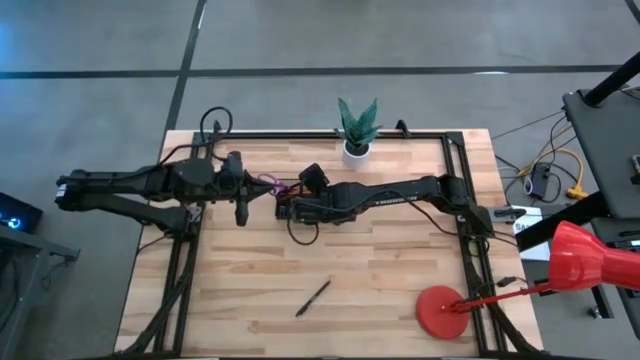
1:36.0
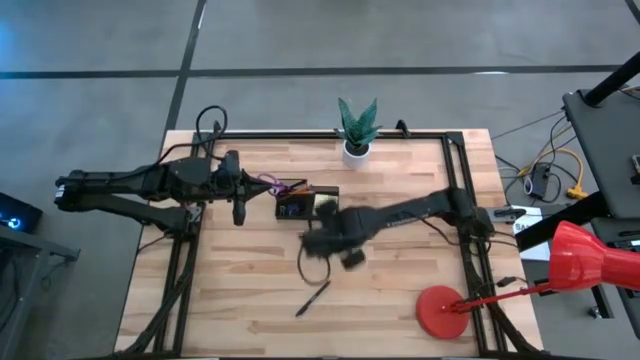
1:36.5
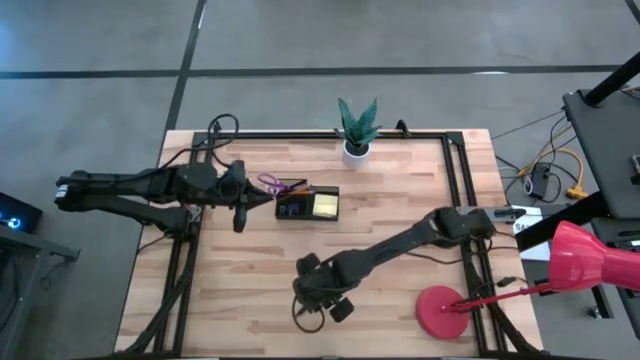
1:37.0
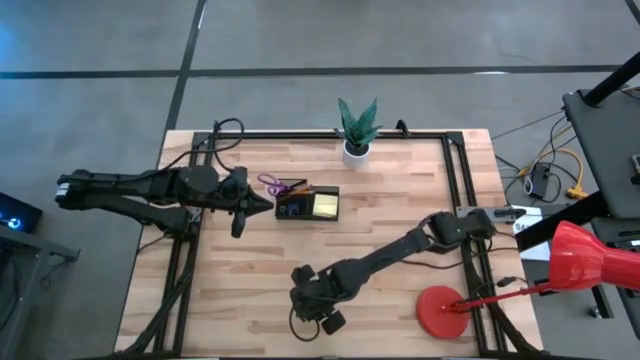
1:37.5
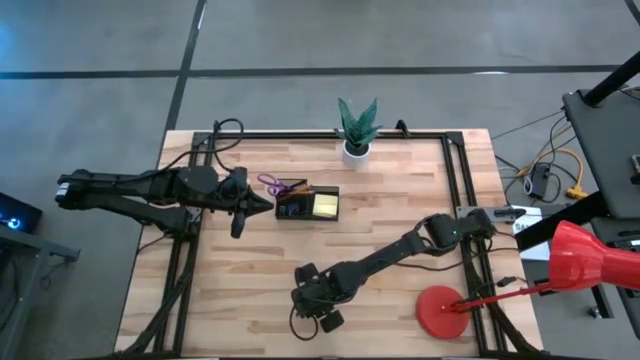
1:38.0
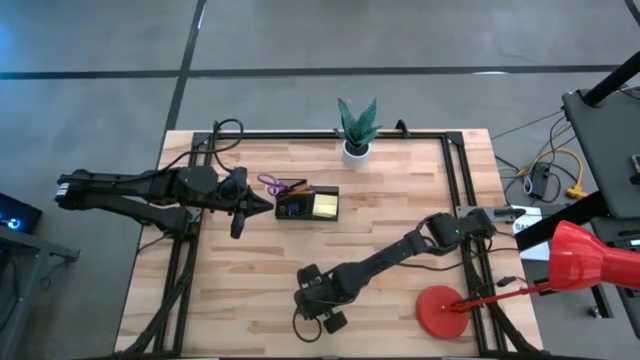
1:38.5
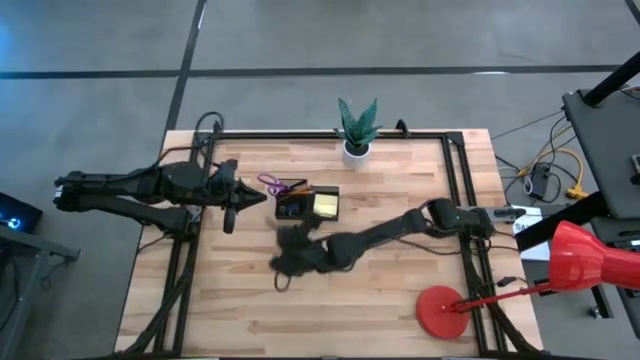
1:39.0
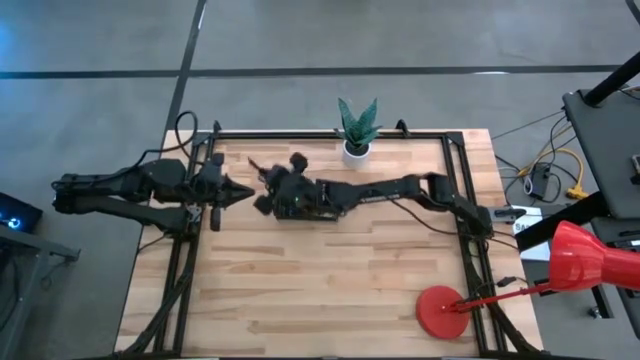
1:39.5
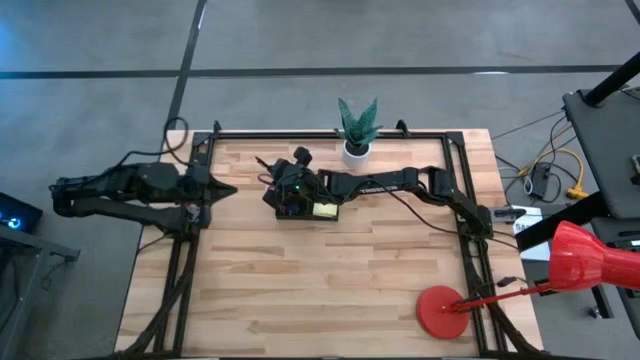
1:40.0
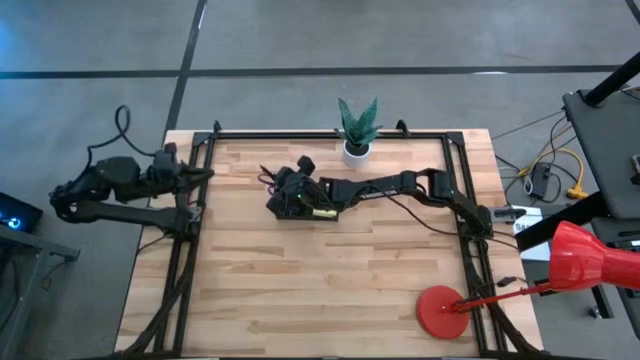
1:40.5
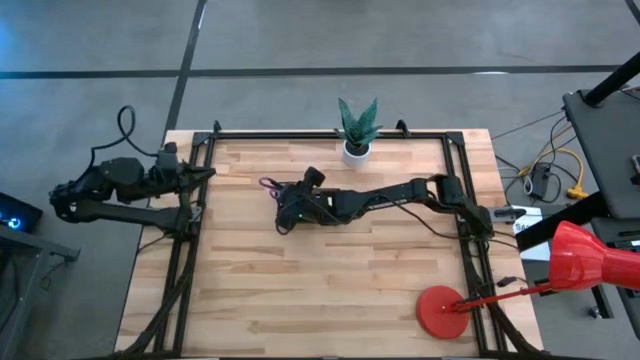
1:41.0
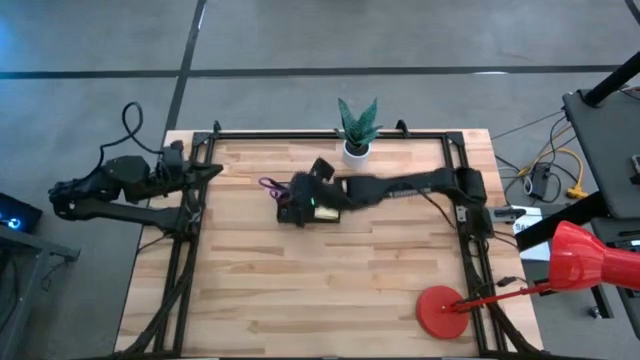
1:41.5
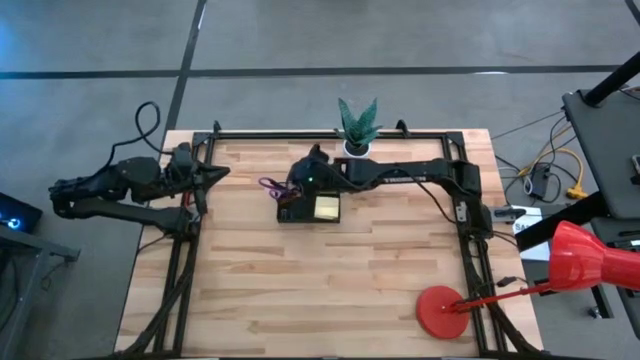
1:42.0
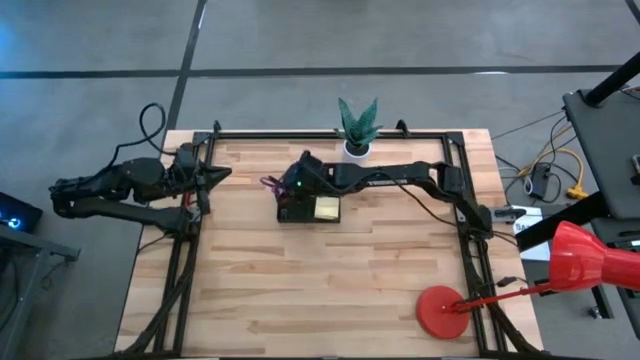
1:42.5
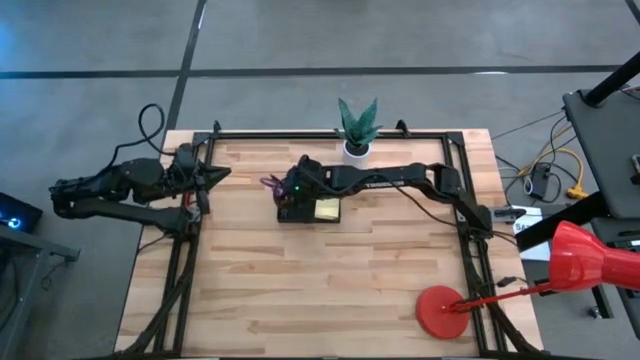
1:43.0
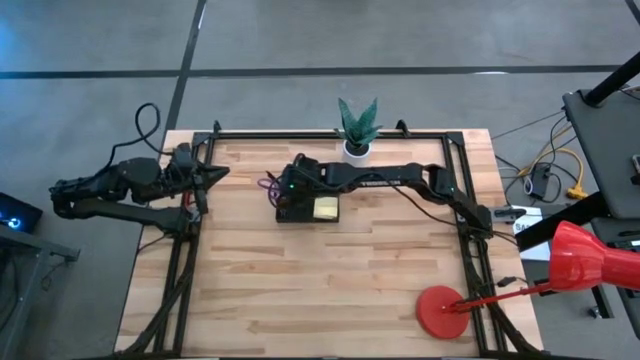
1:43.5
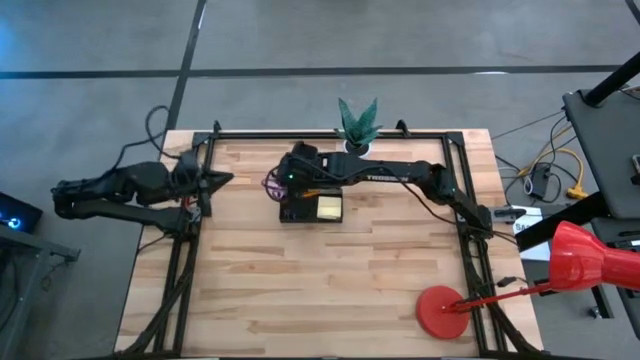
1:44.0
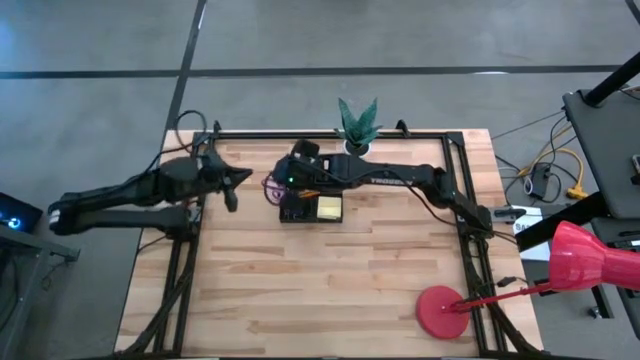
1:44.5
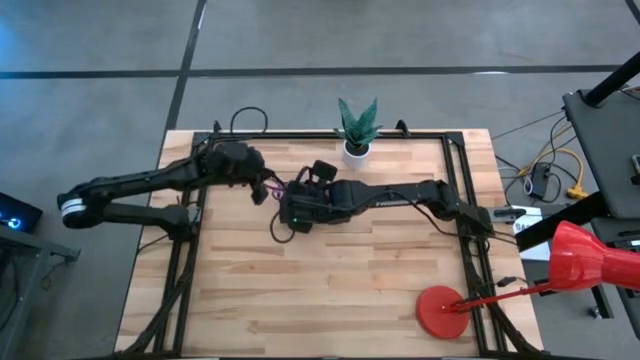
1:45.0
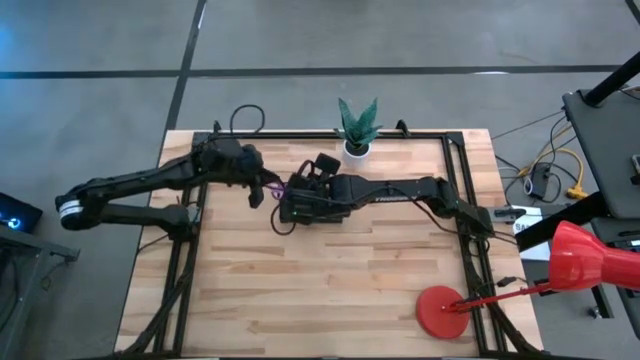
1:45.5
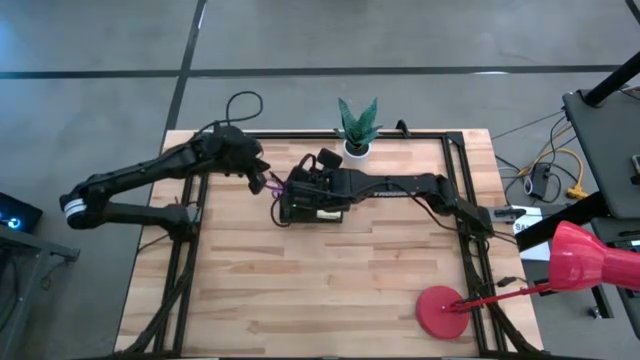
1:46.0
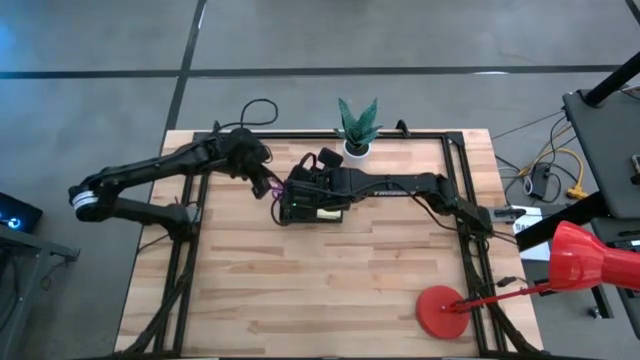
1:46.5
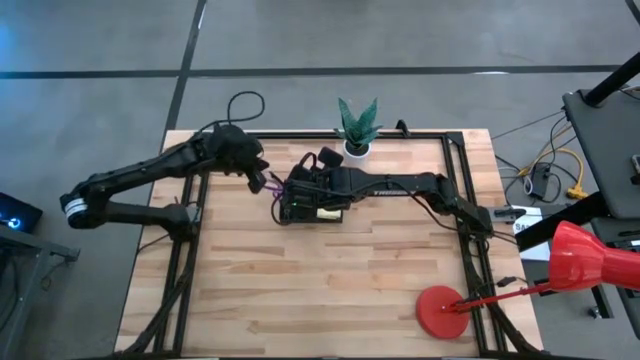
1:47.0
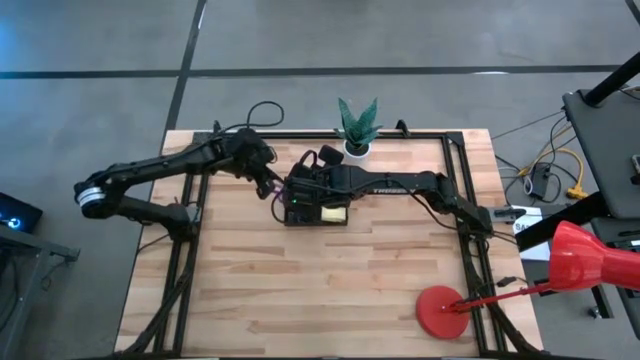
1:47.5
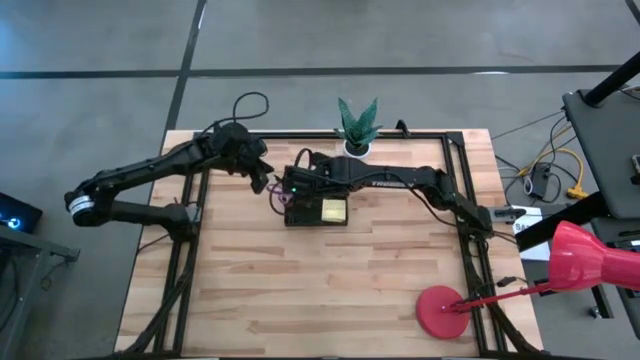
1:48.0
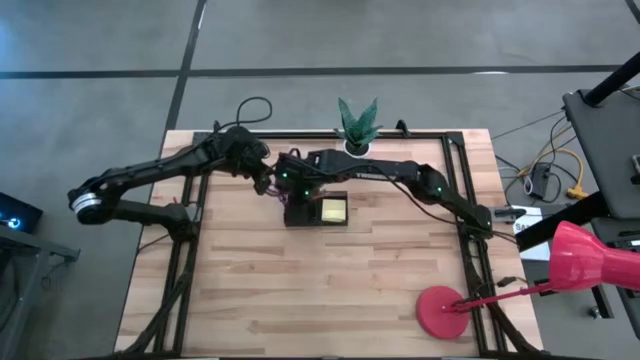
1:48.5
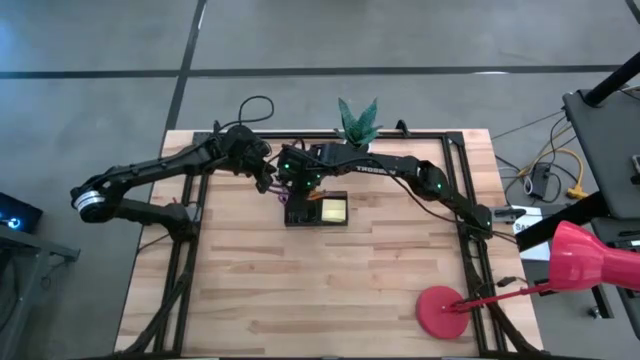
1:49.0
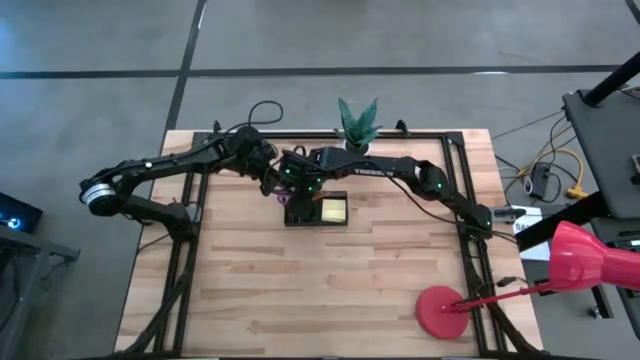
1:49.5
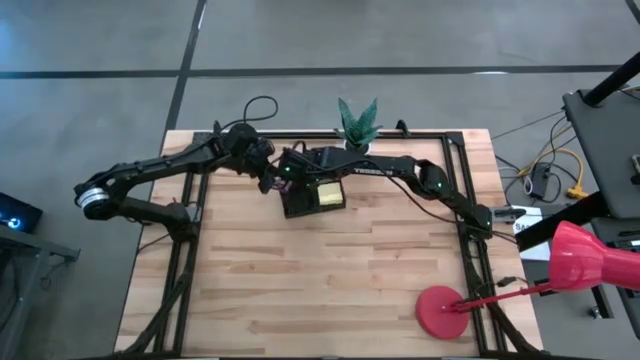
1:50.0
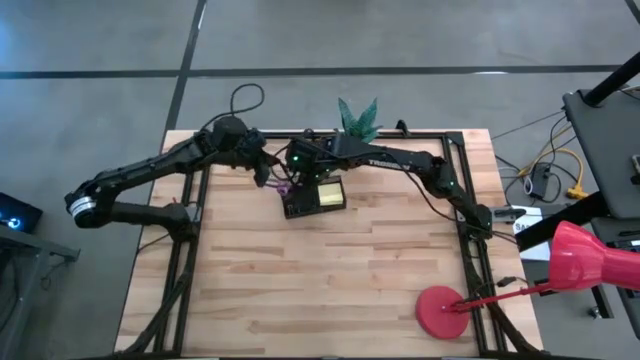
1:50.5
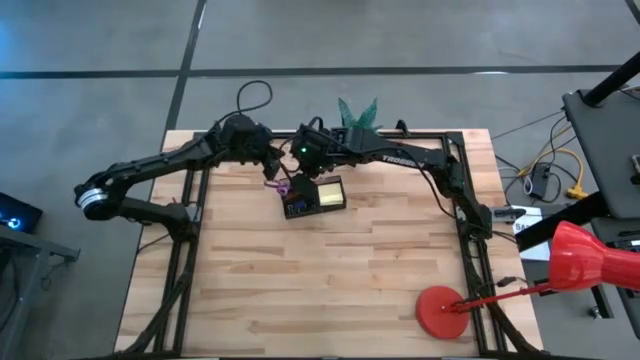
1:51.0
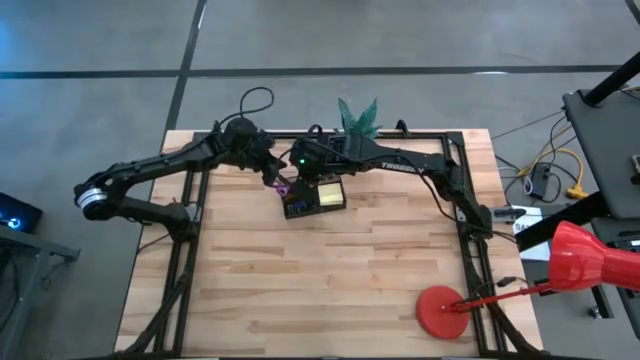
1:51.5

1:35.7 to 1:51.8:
Task: Pick and place office supplies into organizer
Put the pen into the desk organizer

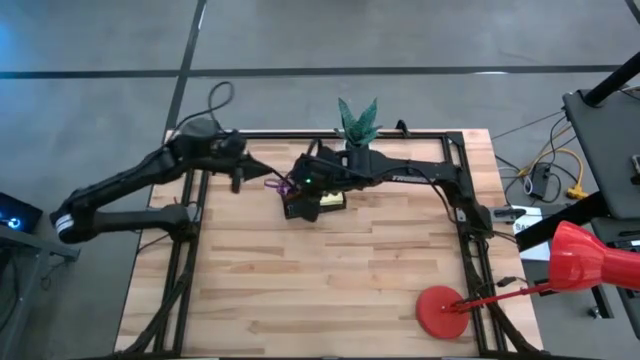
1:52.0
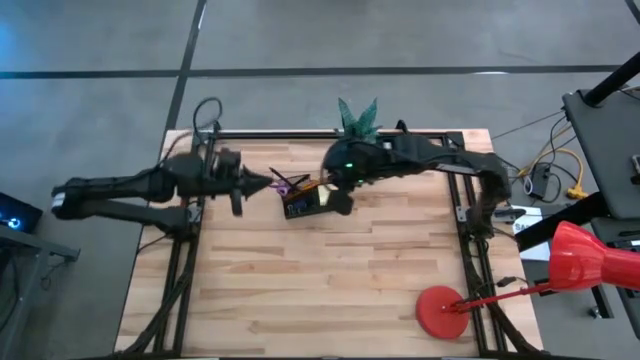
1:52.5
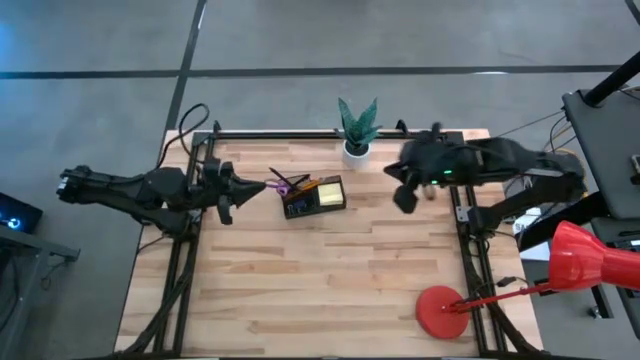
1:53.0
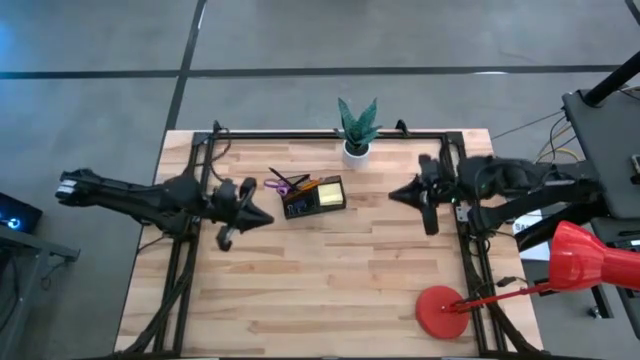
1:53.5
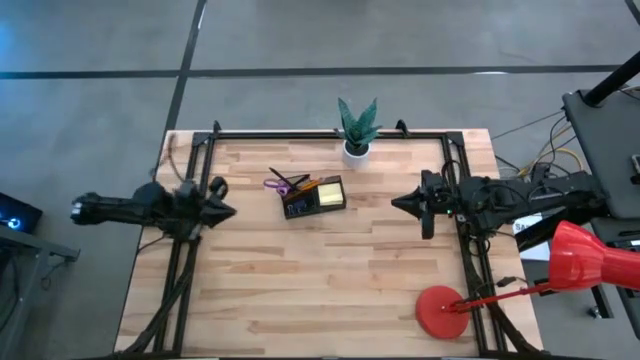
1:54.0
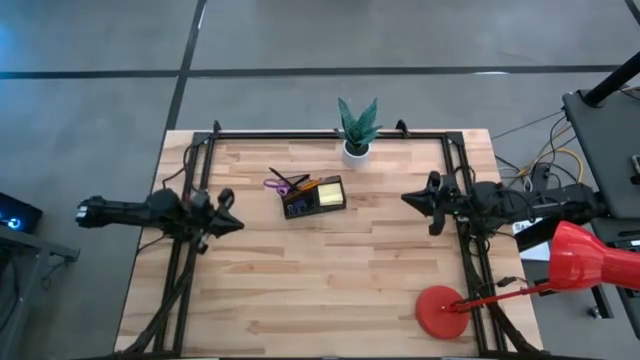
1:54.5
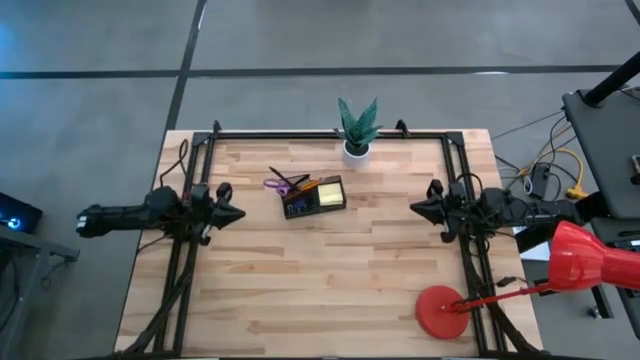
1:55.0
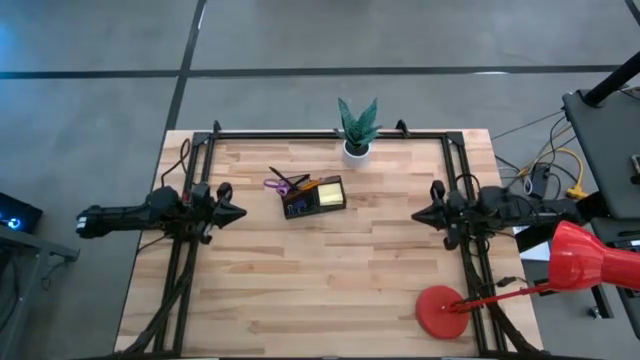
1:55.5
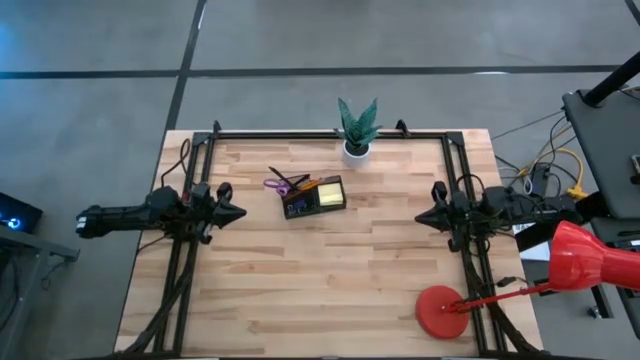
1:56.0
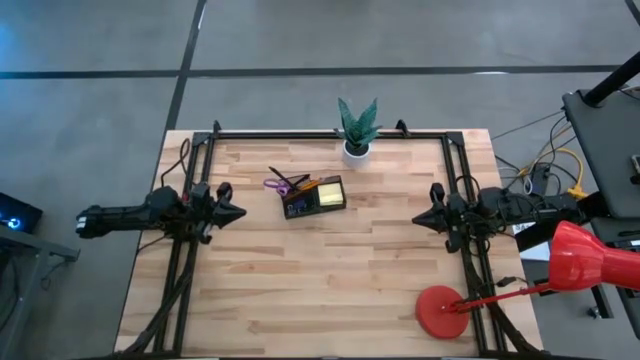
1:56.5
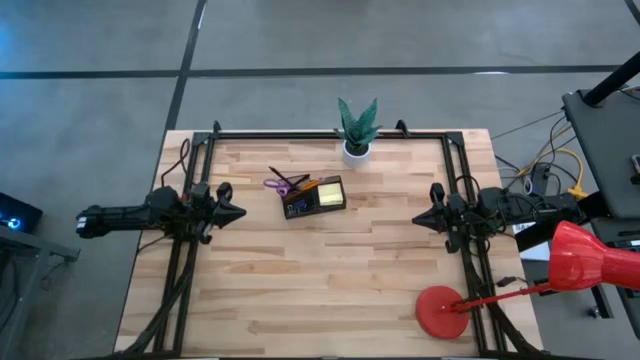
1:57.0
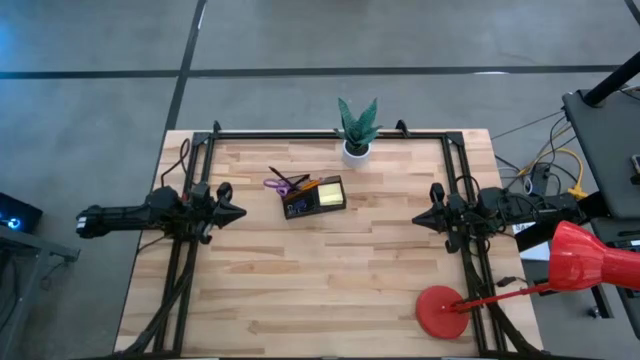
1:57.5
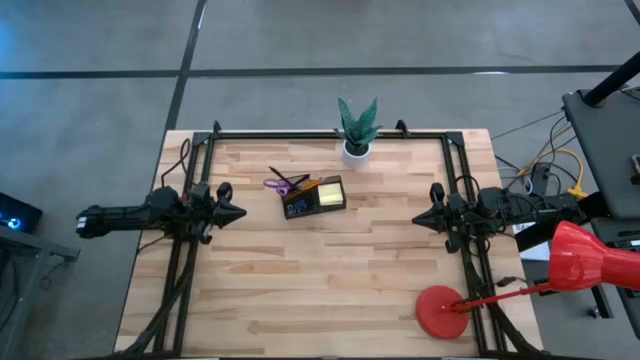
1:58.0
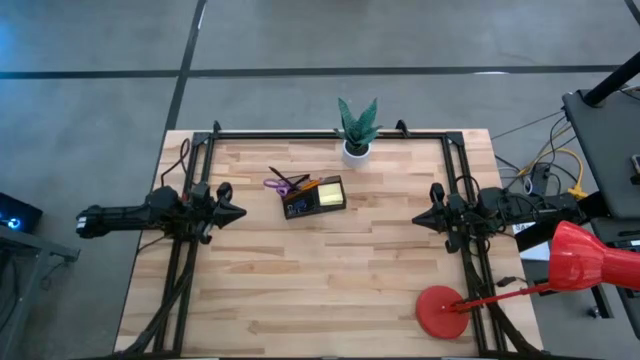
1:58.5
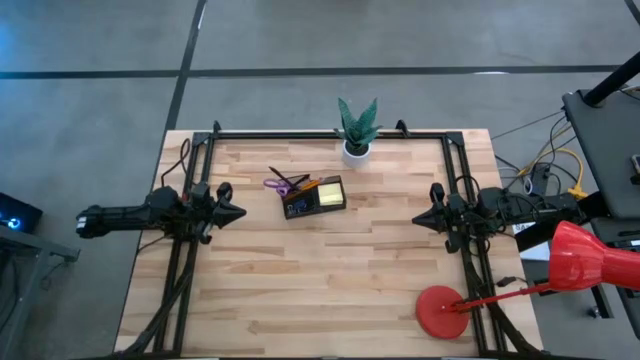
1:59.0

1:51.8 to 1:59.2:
Return to Home Position
